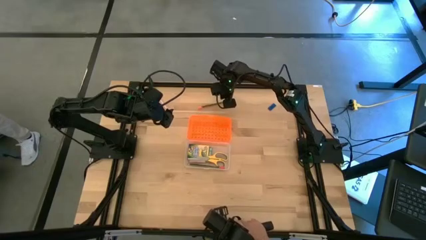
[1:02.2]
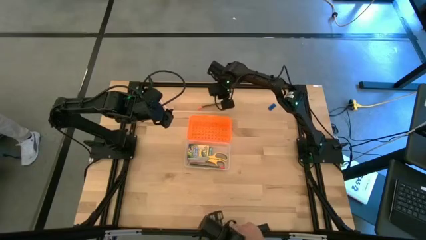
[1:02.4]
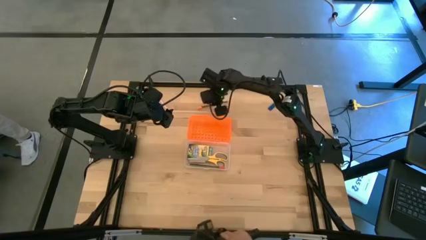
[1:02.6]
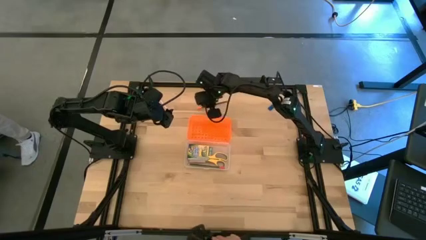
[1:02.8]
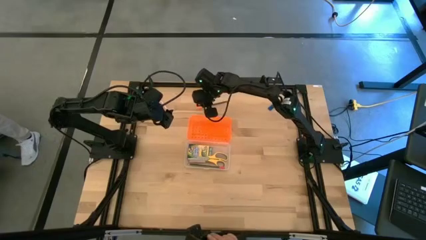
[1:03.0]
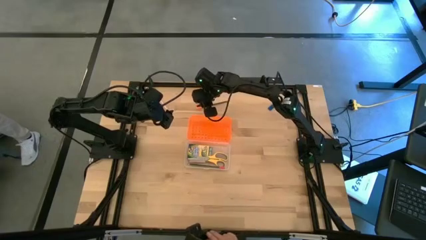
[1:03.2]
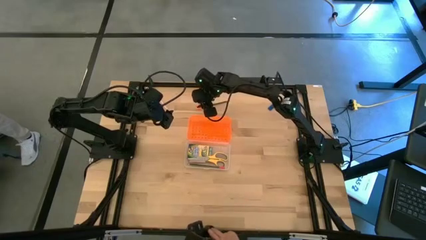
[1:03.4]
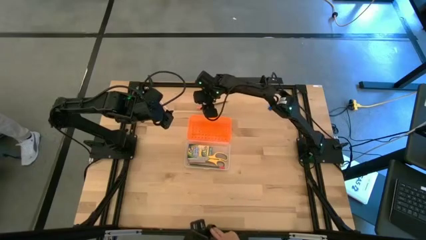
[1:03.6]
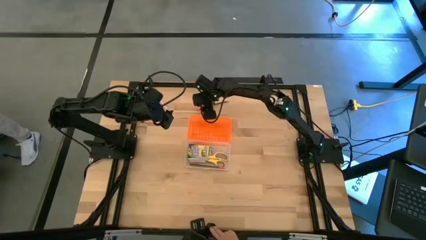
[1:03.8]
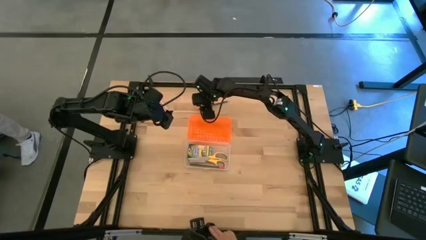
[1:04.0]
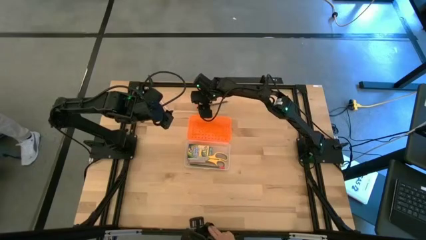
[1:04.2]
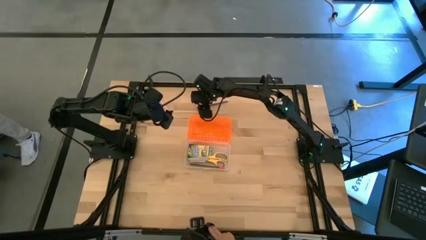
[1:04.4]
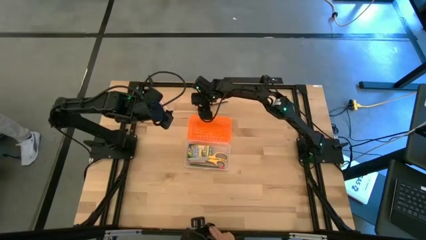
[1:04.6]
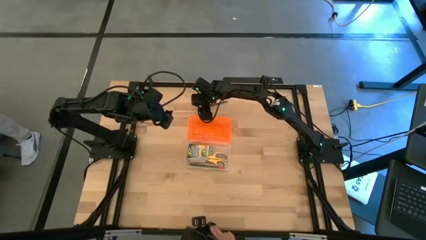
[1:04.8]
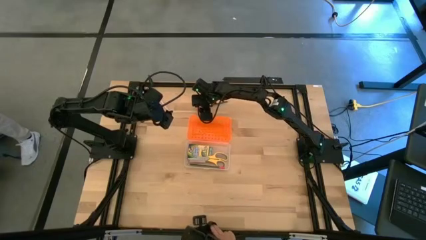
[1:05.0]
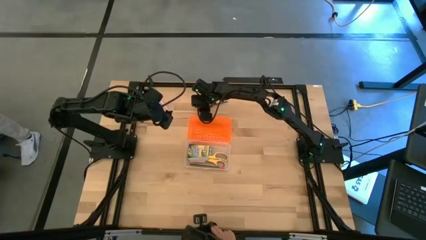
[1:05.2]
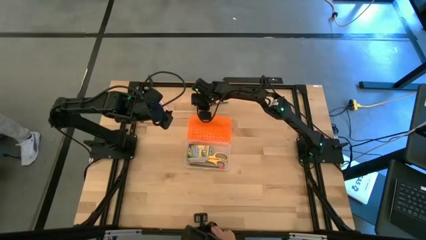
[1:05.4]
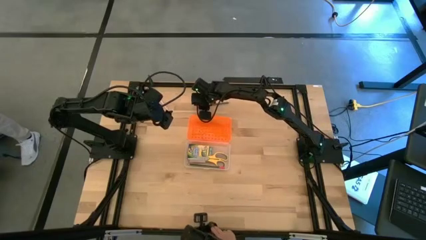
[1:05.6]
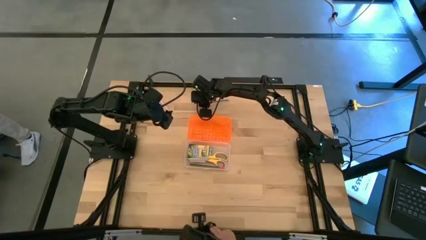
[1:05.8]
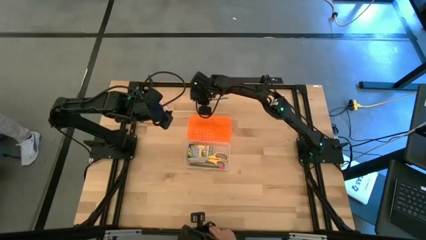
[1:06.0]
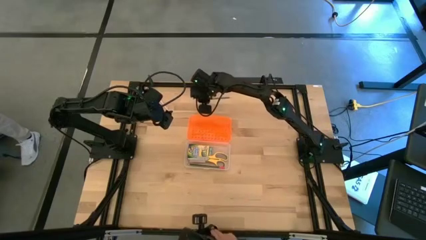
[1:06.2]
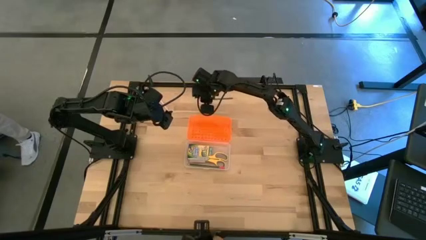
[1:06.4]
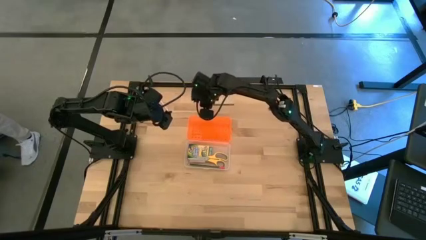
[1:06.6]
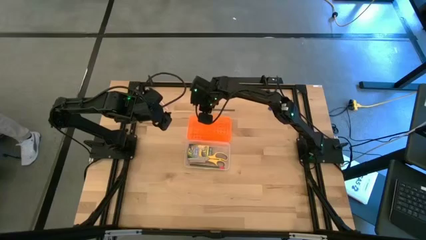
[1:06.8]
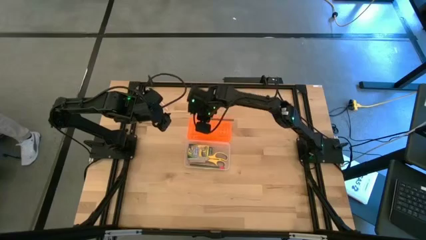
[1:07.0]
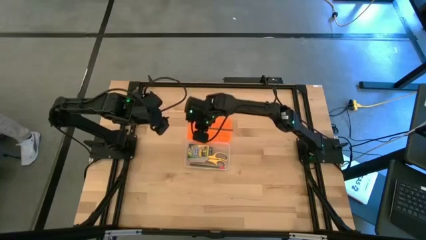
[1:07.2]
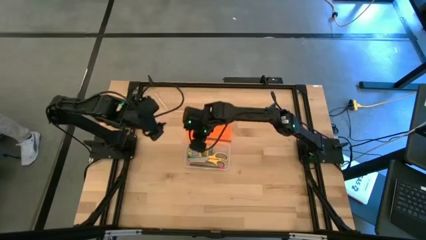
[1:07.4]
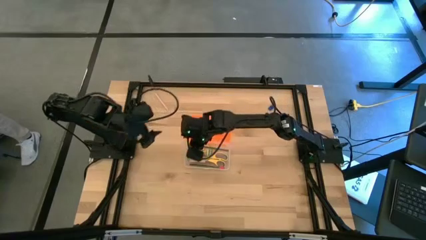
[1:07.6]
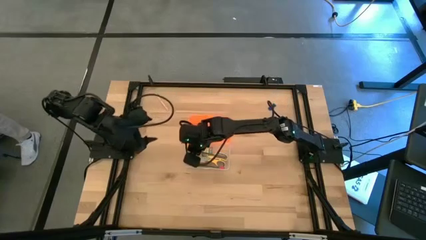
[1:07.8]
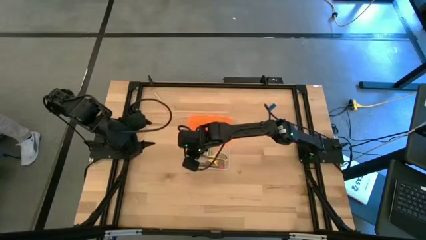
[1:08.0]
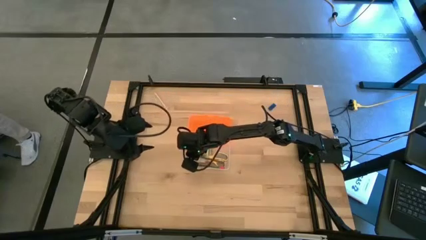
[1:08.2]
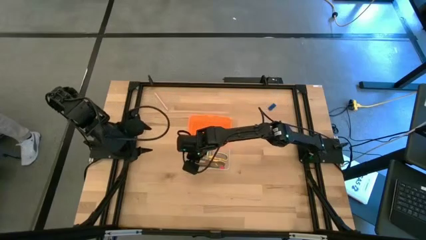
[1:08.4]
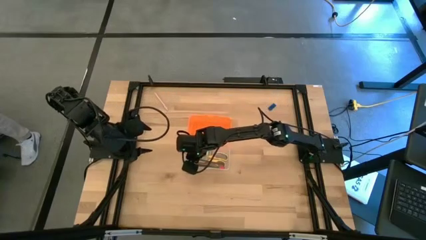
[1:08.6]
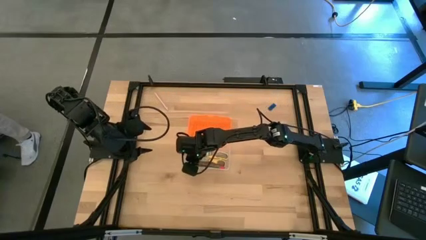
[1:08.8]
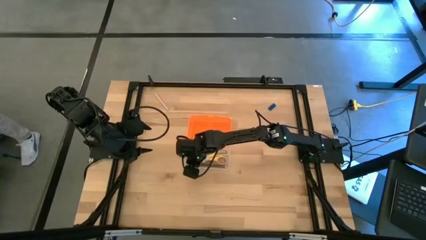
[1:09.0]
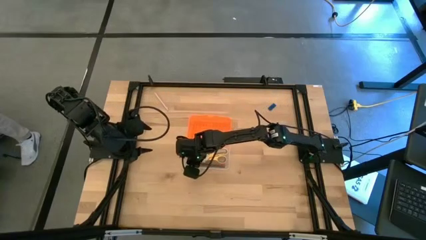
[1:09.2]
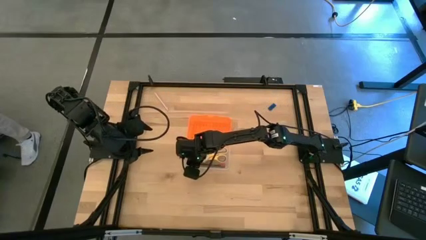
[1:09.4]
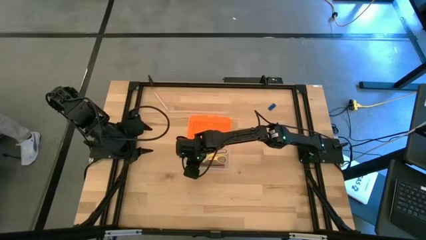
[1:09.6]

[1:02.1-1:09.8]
Task: Pack school essentials
Put the black pencil into the supply box

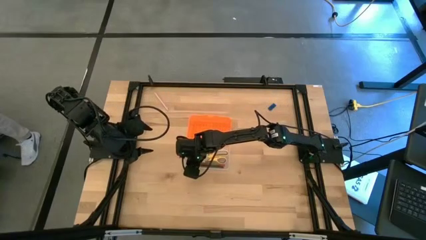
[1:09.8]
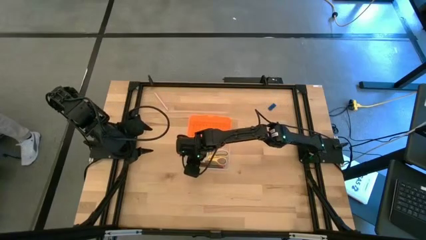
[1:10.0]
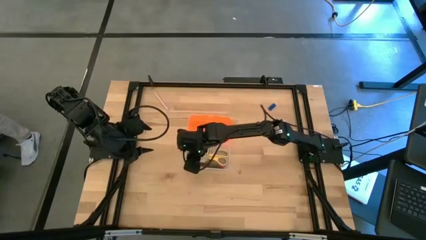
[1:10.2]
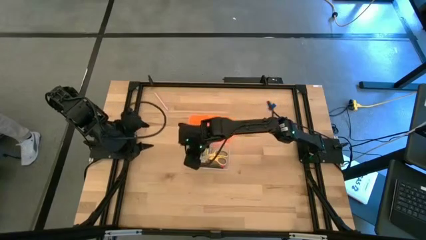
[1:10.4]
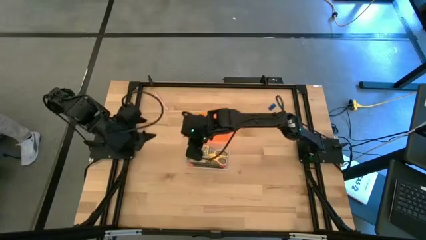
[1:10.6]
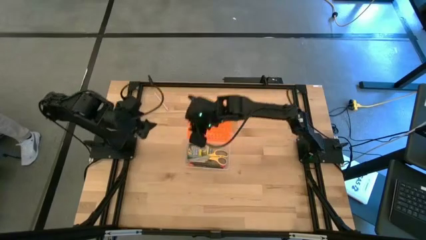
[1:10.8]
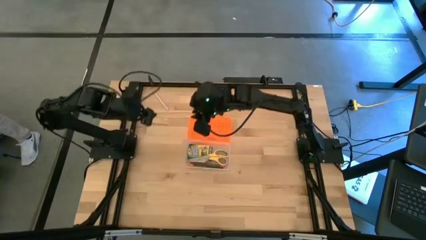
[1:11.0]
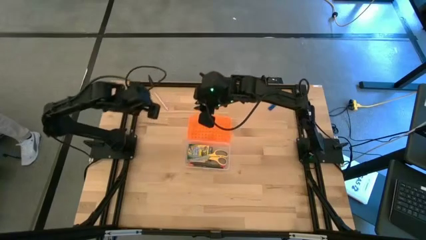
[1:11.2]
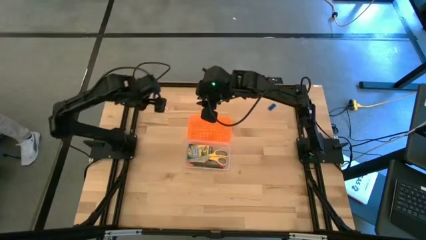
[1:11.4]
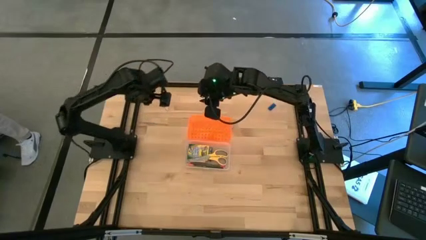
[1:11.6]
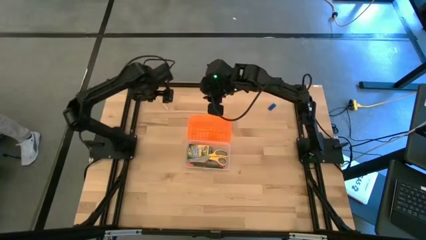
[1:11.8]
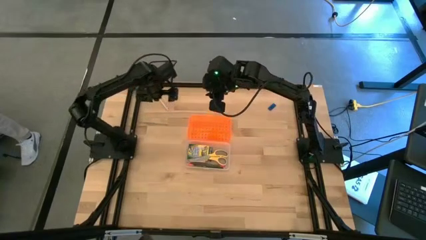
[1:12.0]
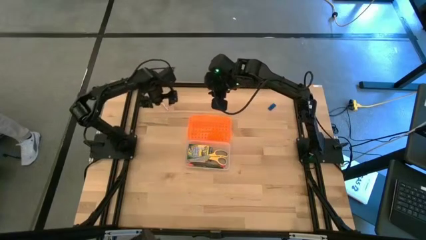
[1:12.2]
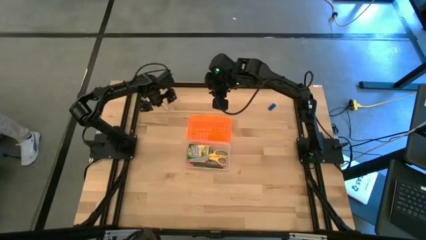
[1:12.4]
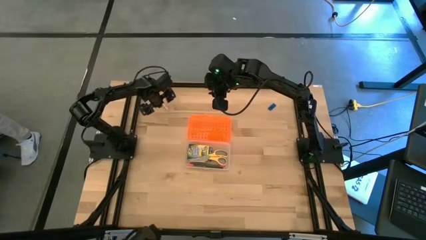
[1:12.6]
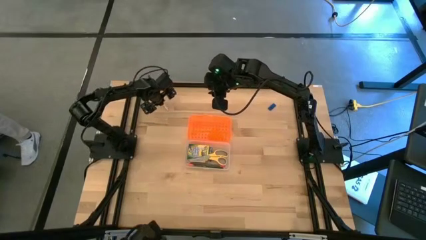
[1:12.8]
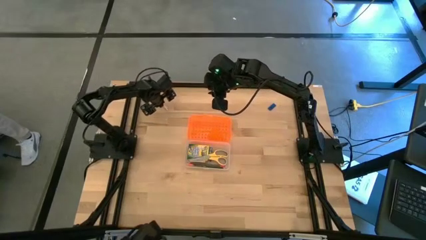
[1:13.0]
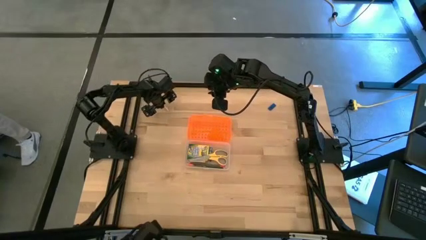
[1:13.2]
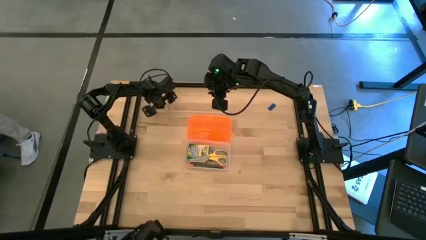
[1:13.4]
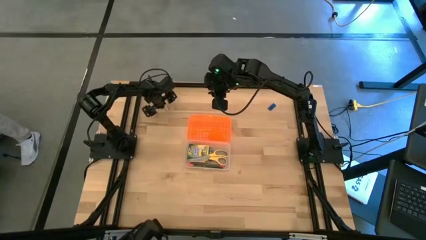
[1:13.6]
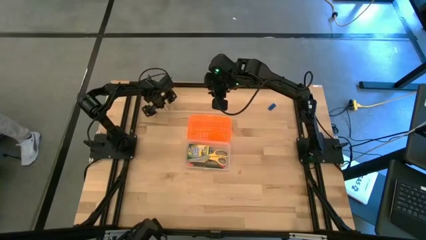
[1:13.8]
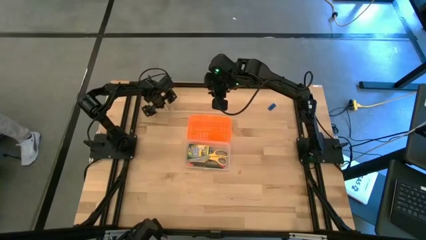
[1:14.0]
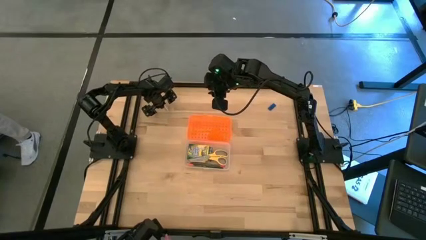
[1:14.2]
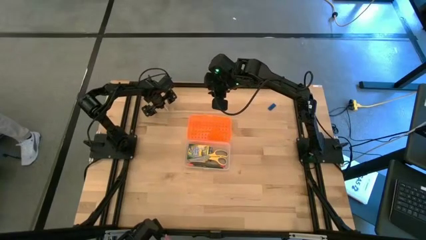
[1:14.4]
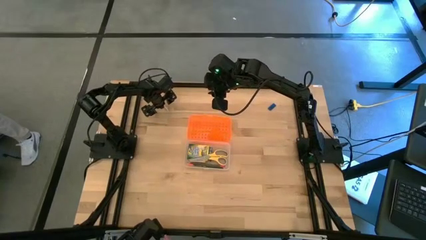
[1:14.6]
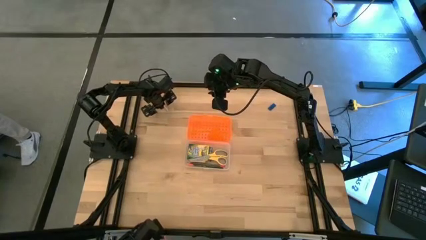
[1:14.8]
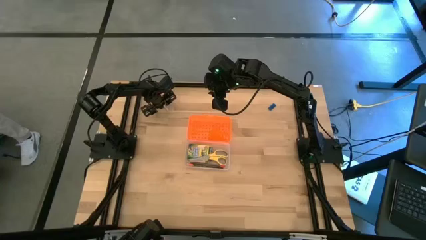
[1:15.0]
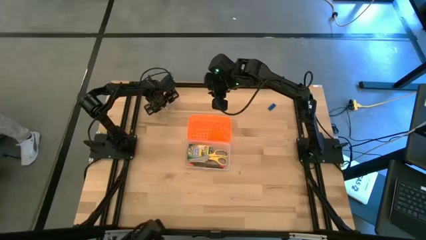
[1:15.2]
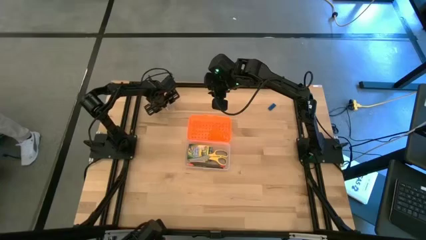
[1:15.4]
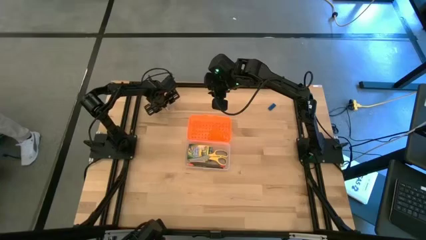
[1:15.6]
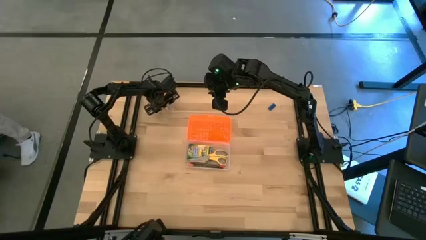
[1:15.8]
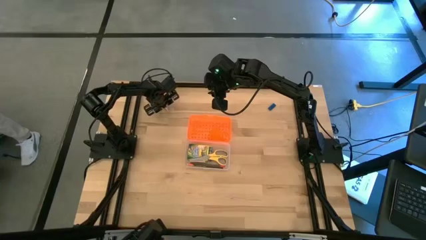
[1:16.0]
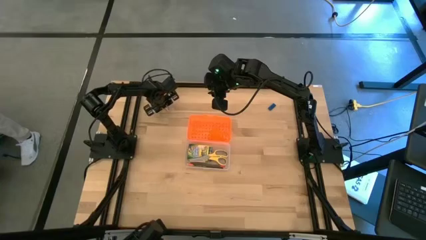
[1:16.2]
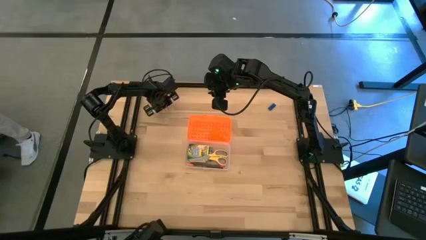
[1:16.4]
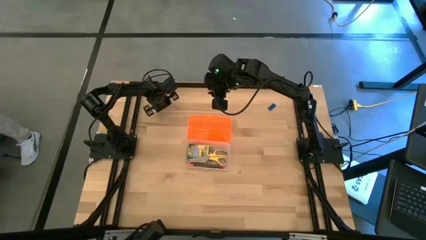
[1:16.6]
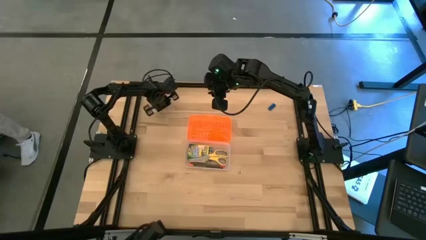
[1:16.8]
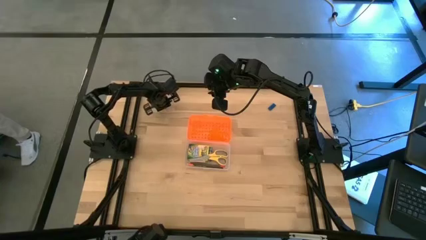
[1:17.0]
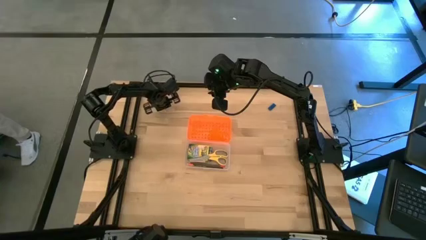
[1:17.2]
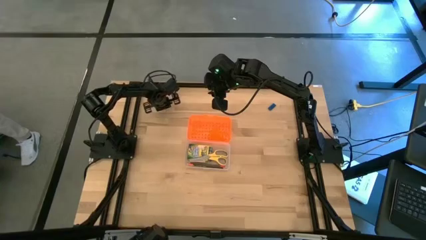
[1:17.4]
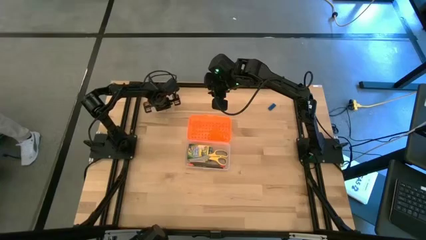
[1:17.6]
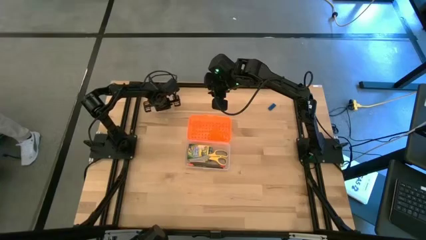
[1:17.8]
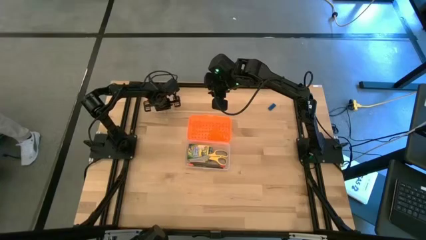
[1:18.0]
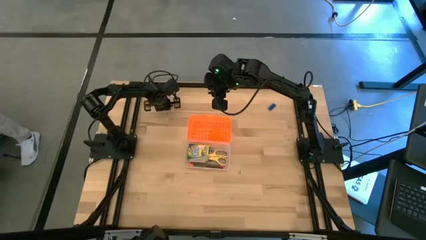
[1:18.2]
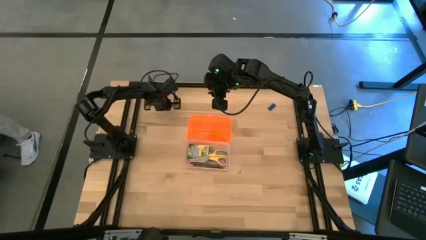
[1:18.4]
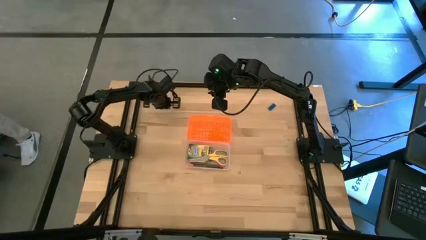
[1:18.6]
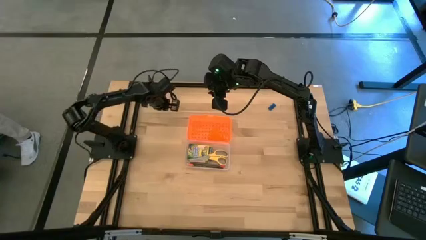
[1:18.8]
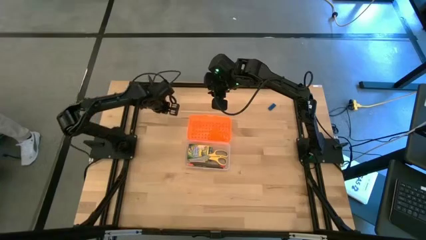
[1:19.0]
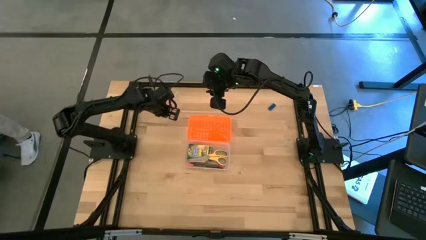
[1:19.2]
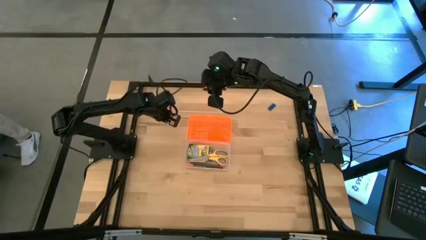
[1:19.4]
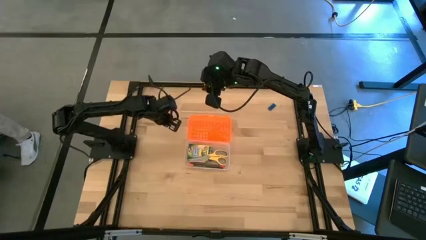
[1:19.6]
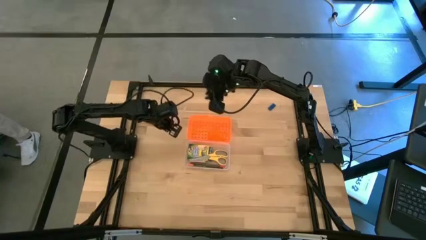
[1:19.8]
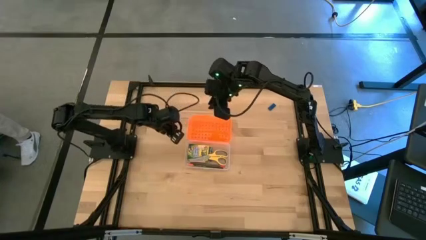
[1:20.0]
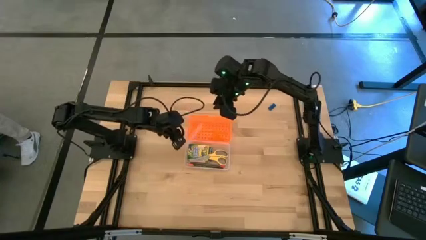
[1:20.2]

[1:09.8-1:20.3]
Put the pink pen into the supply box
